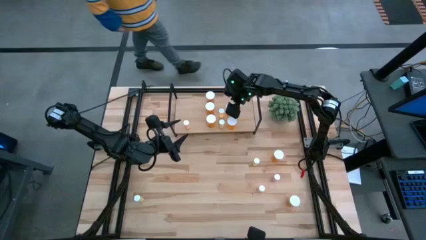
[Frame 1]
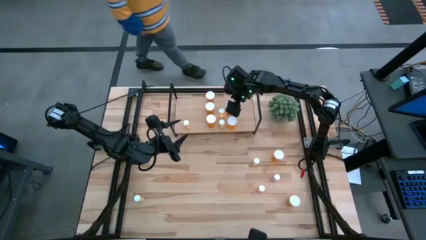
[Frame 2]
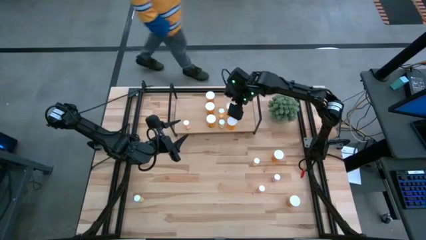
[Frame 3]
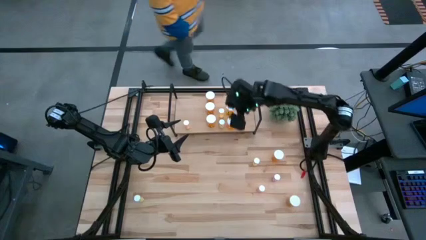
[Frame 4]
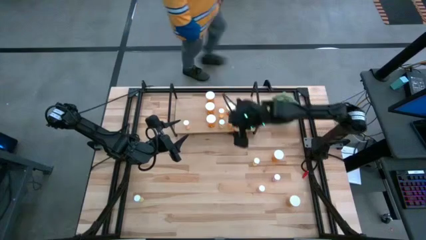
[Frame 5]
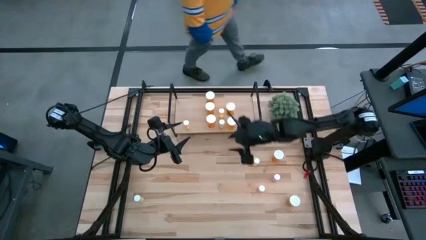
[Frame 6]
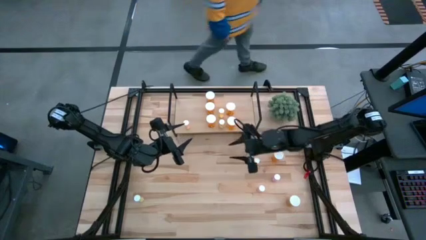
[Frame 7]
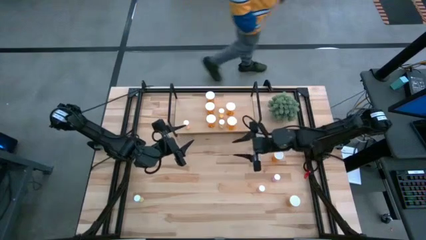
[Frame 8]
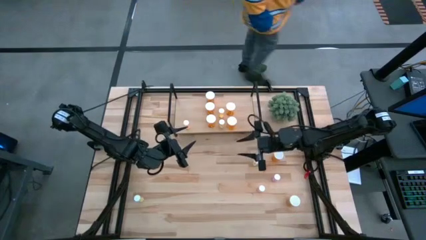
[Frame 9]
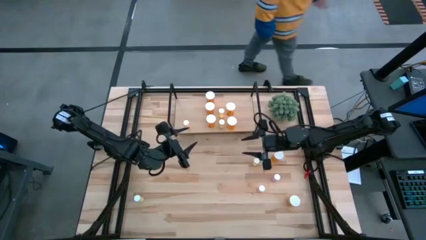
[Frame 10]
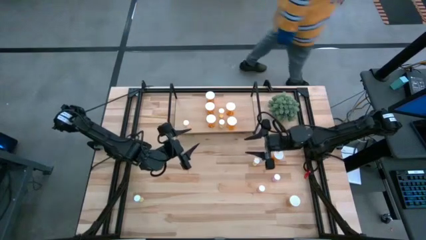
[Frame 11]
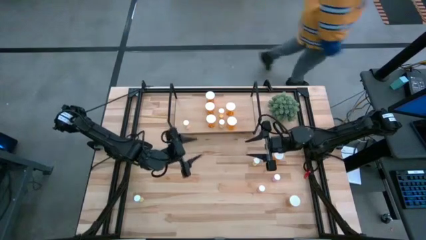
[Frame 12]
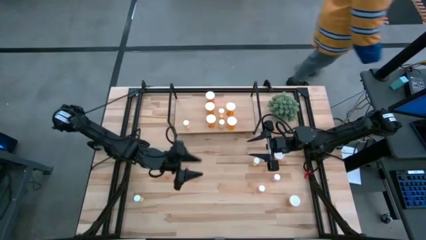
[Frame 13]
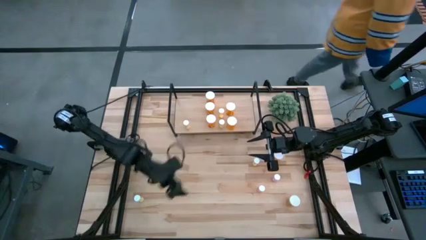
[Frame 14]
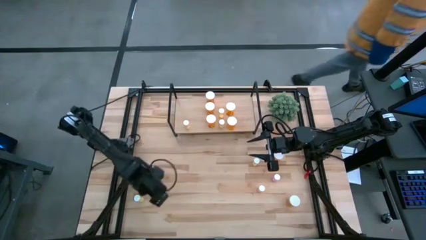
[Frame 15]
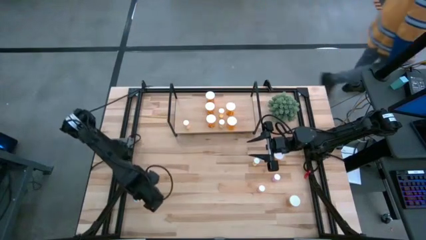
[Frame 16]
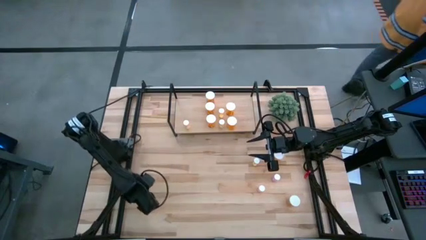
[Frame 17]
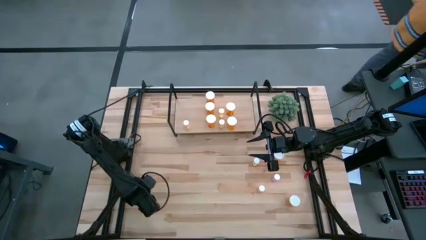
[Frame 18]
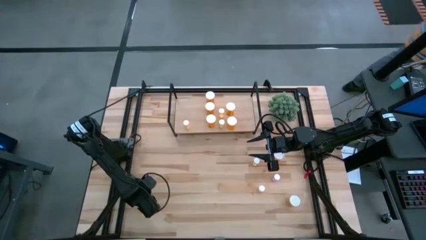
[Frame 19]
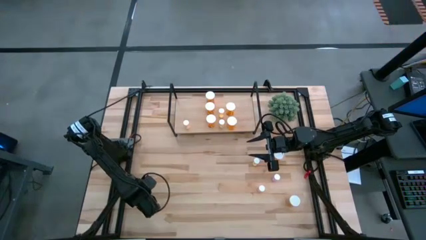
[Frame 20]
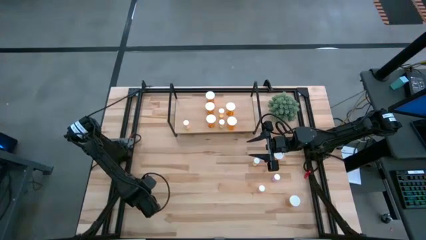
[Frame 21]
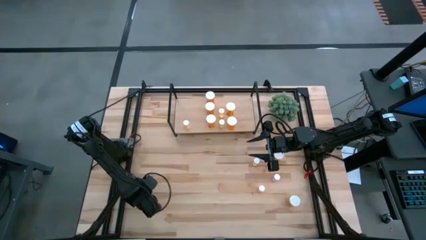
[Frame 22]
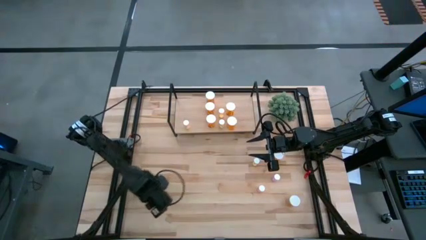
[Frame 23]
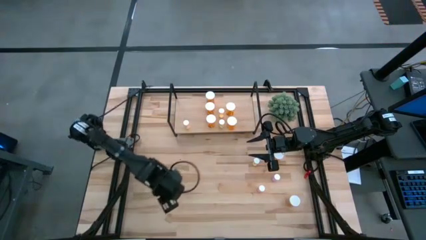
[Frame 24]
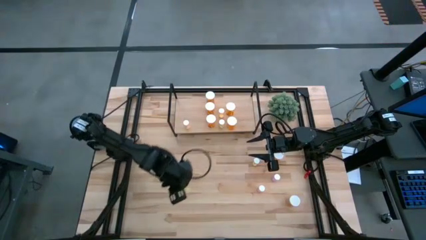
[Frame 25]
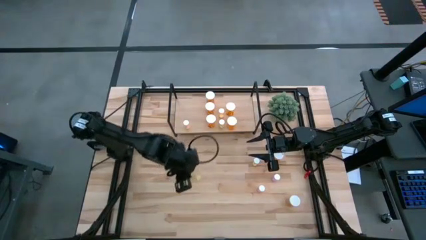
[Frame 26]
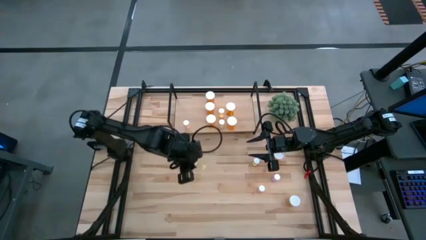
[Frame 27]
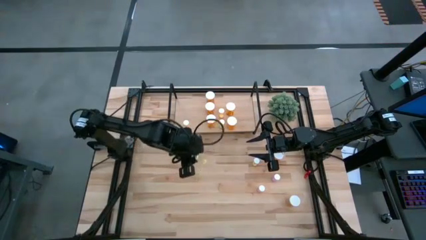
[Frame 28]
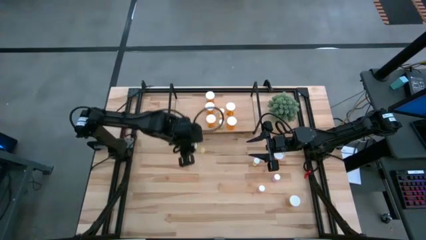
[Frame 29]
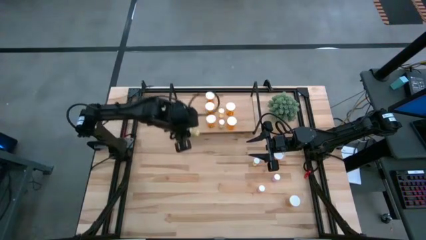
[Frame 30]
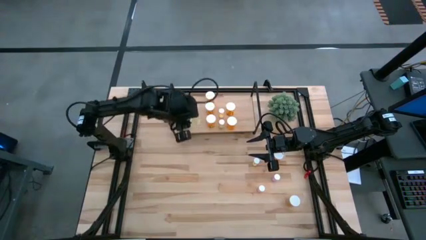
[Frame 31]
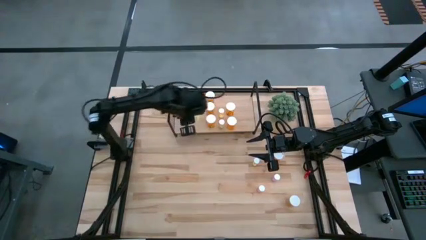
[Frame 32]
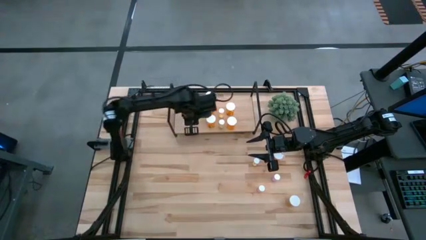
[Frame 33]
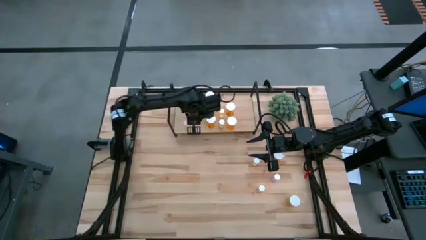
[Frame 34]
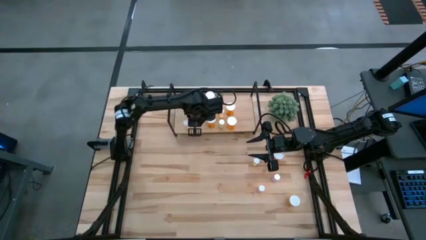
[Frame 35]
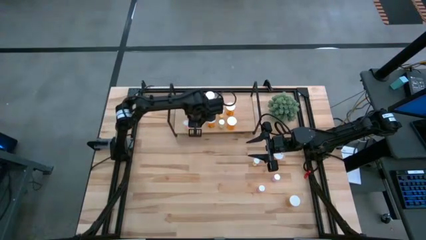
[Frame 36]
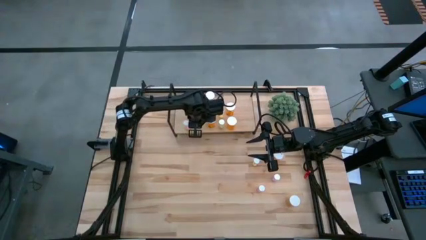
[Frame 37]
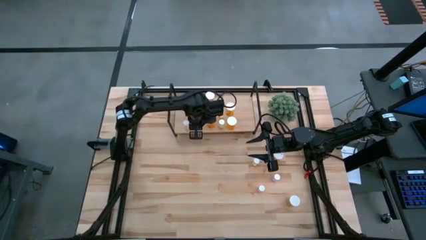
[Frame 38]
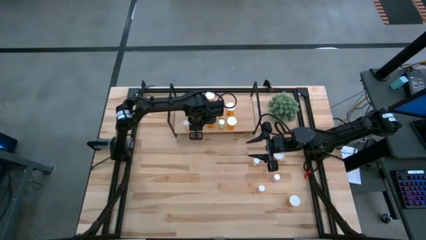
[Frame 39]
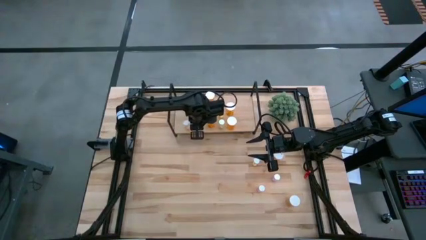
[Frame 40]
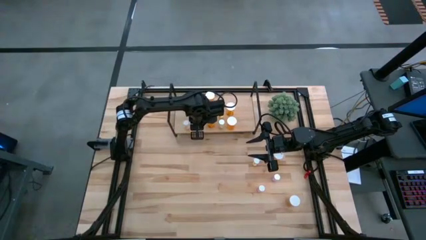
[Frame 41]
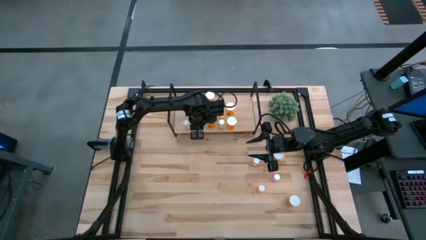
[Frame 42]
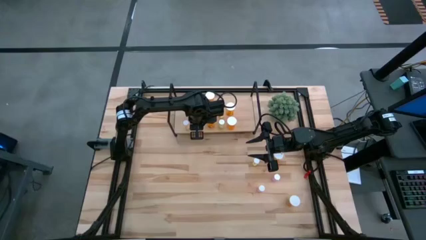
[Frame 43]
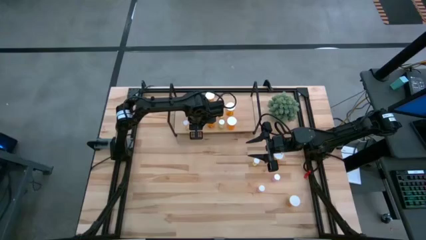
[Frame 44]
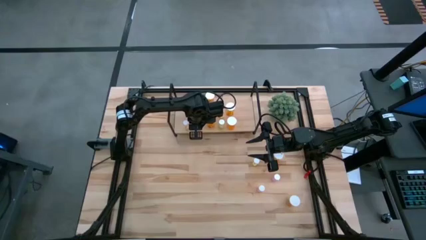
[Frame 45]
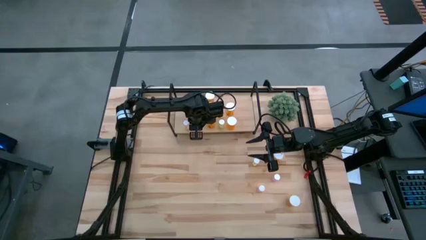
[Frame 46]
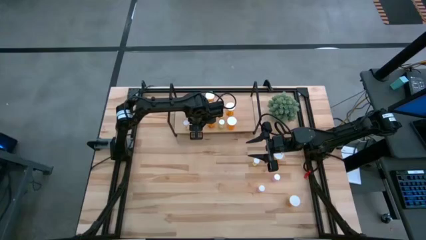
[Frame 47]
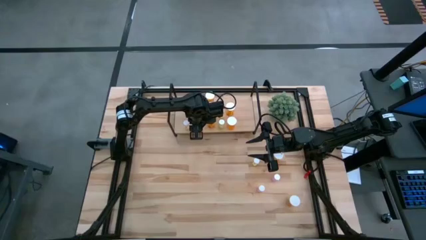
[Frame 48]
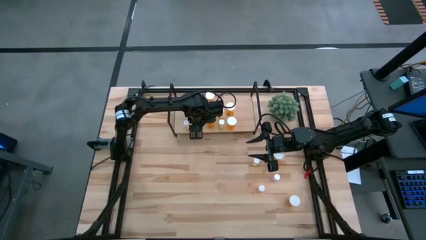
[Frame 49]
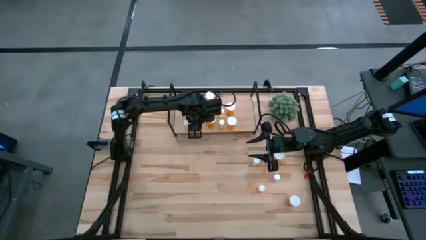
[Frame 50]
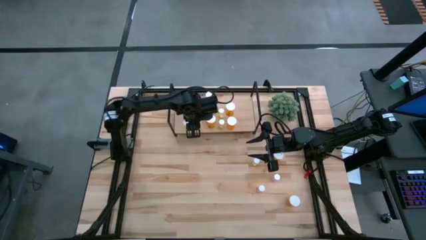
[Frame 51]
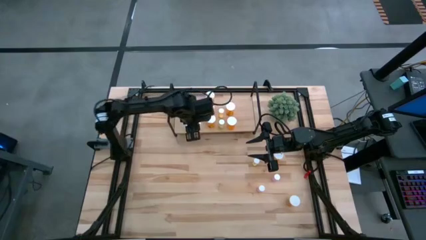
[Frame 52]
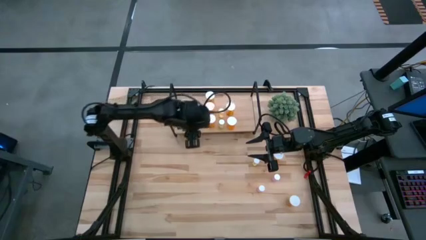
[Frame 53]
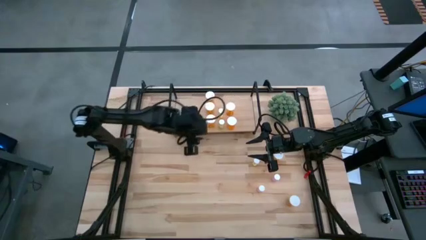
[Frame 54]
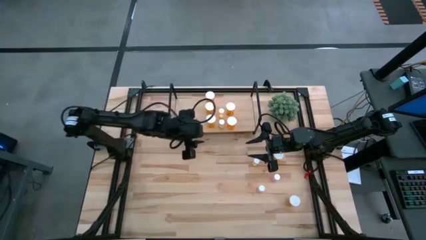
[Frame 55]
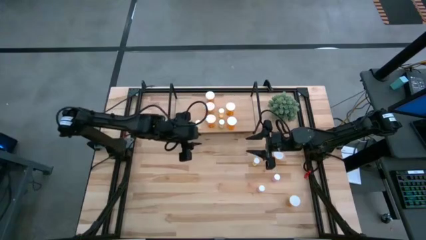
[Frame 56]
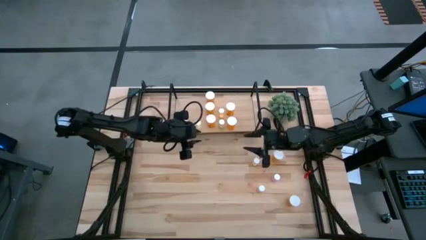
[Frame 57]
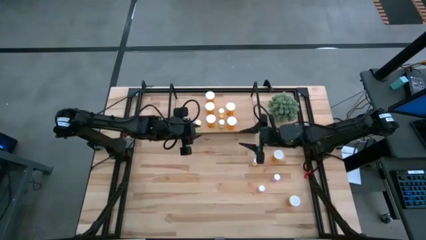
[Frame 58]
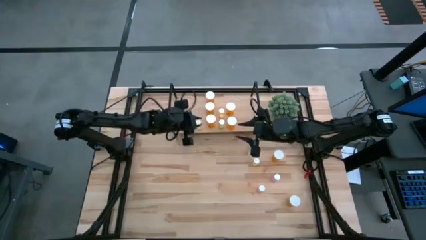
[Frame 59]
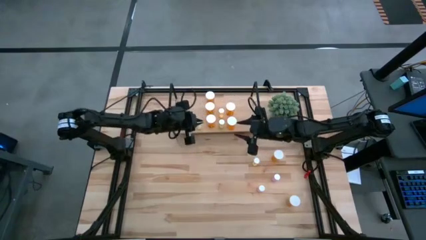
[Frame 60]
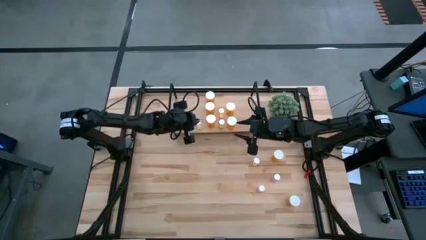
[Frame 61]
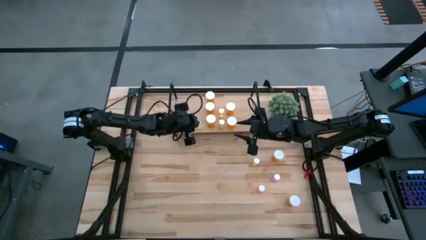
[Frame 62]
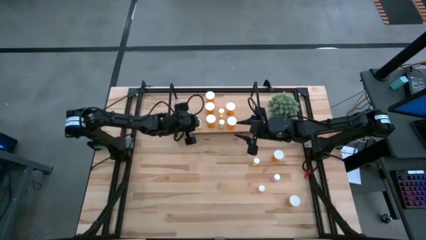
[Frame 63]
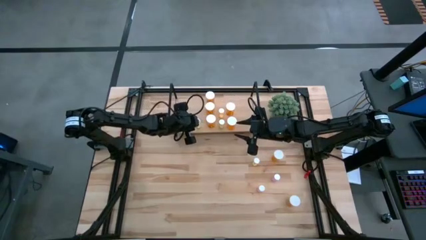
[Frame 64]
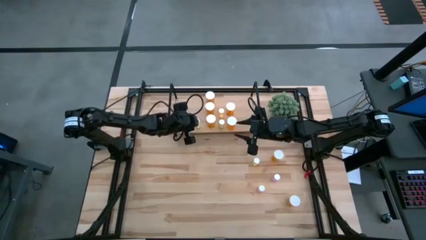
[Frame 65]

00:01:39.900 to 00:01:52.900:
Task: Pick and place medicine bottles onto shelf by color
Put the small yellow pill bottle on the shelf

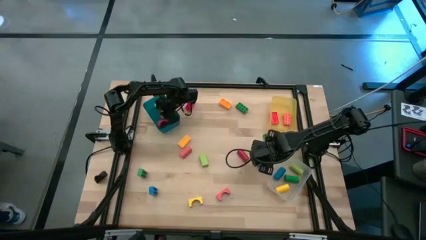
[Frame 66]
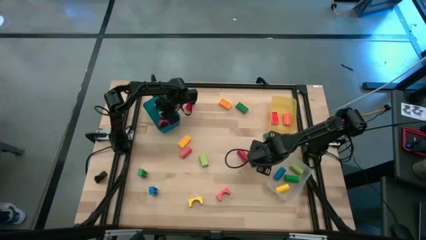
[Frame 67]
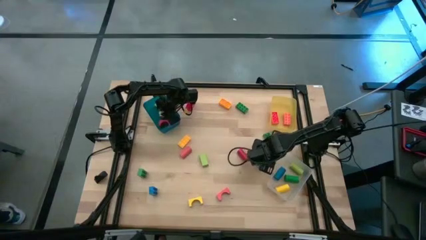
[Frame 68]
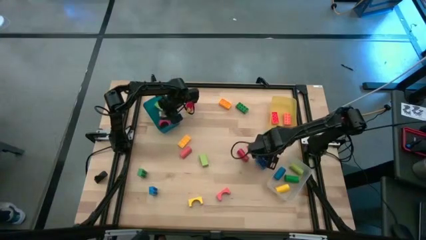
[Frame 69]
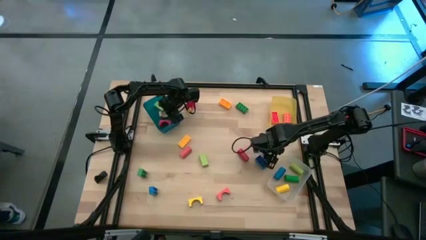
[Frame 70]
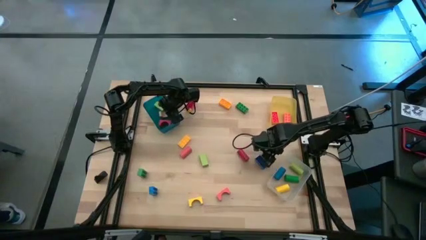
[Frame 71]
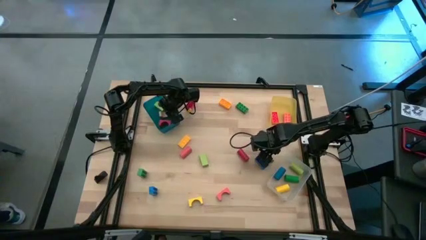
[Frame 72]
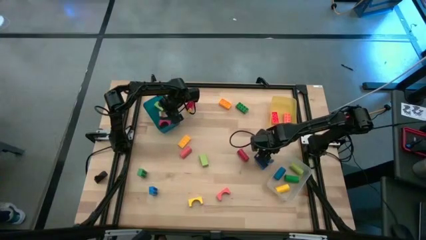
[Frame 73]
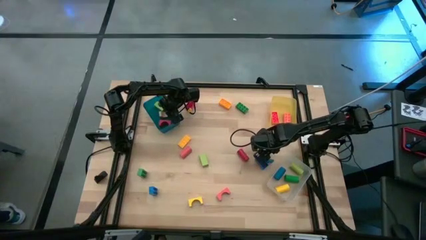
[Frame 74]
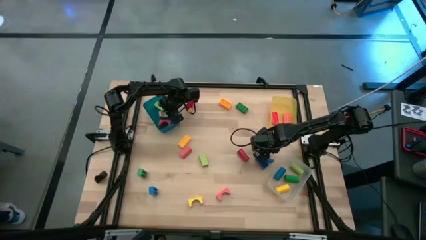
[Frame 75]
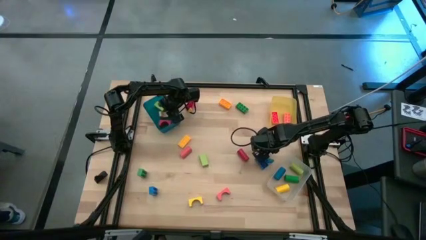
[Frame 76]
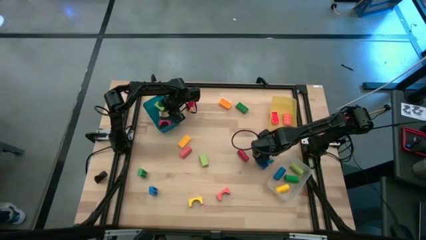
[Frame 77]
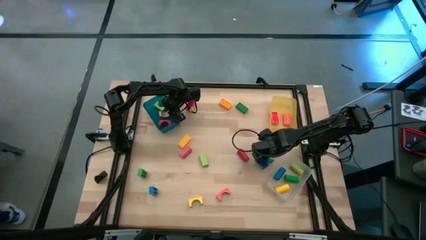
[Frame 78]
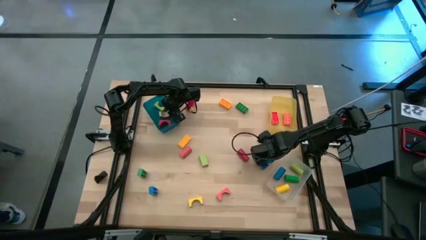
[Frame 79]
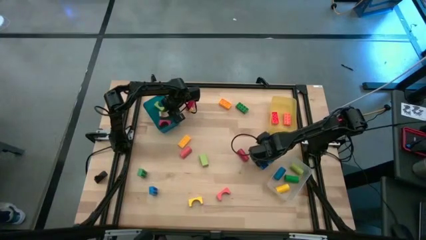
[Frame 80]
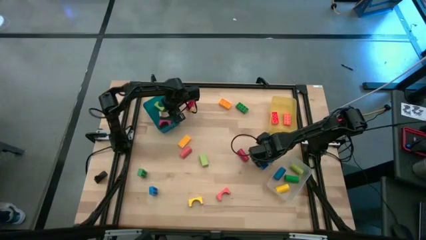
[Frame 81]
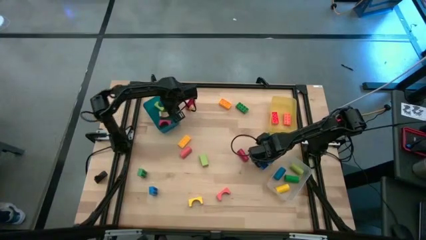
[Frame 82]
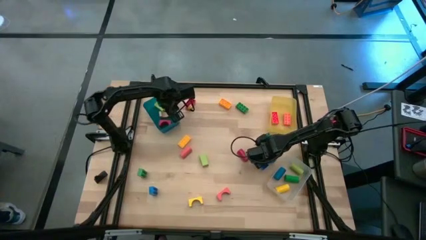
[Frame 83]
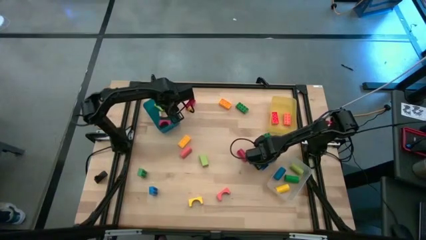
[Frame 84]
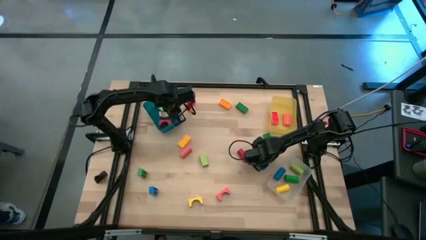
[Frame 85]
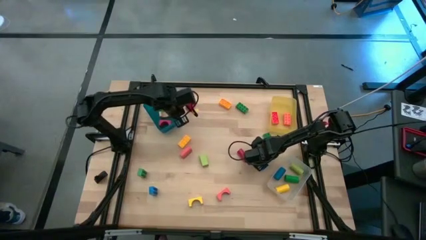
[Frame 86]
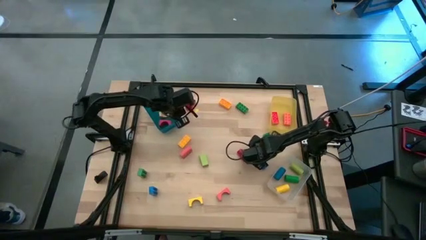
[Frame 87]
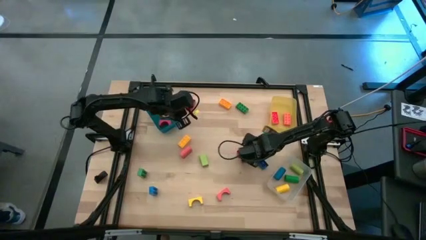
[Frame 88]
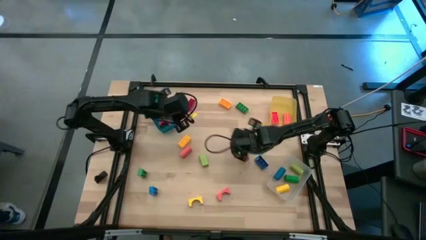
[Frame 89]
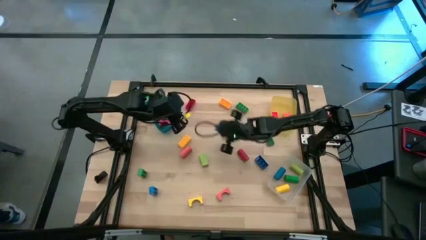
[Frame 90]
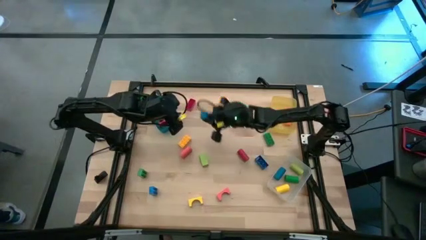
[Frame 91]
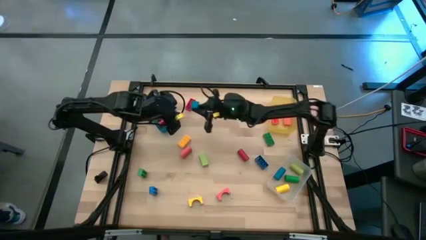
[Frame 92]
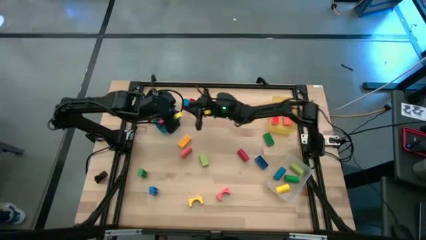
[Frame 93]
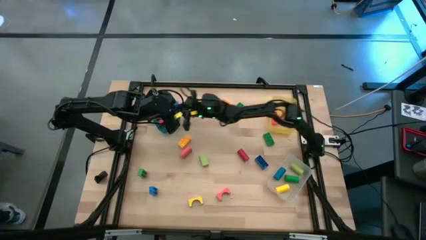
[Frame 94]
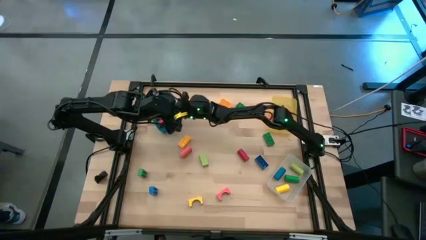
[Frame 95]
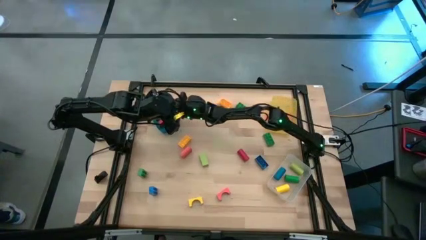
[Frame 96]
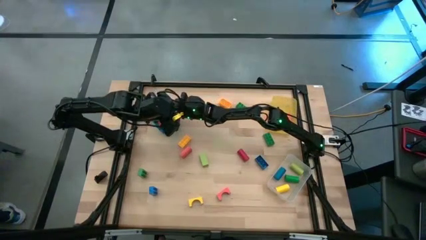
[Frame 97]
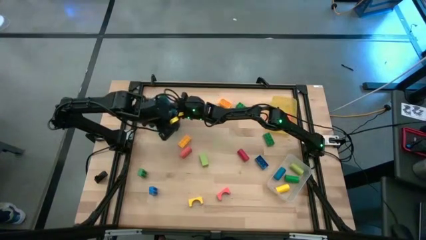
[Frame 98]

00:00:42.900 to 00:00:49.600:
Task: Sort blocks by size
Put the blue arch block into the blue bin
